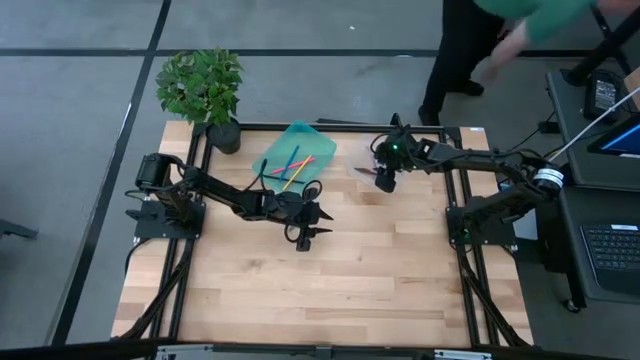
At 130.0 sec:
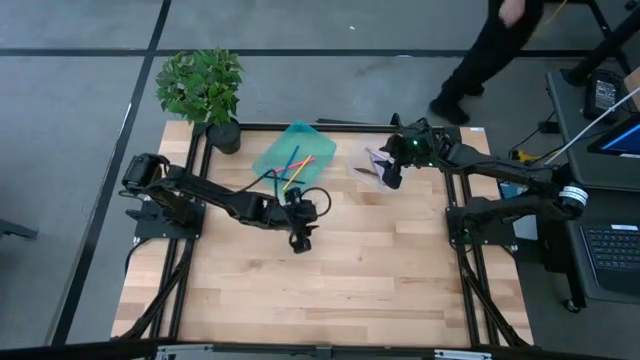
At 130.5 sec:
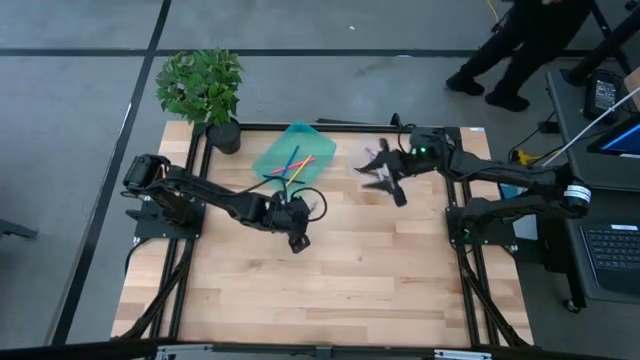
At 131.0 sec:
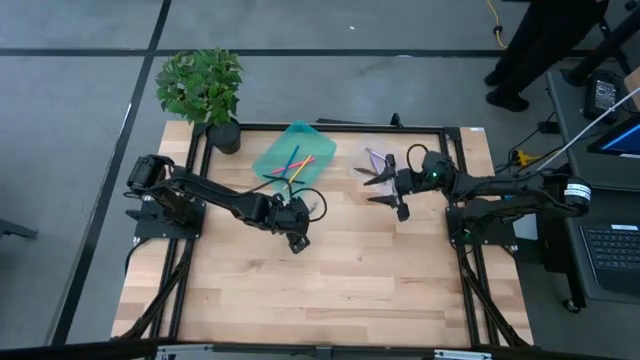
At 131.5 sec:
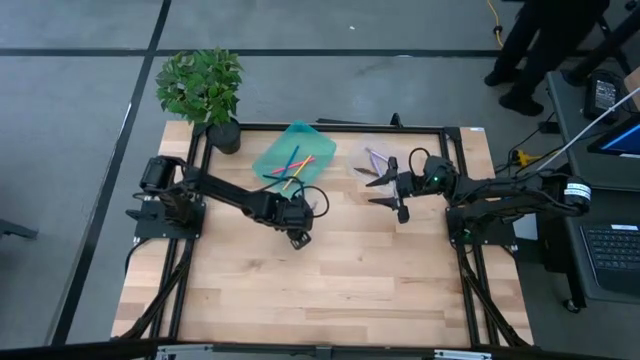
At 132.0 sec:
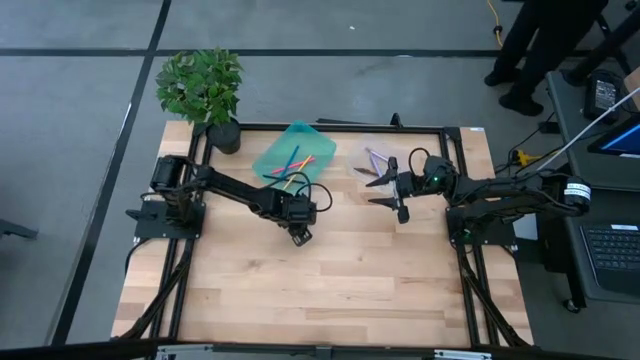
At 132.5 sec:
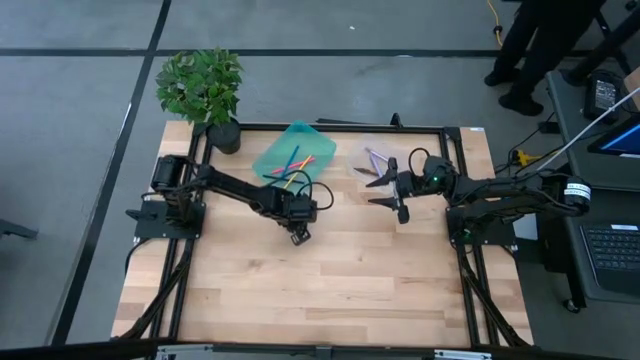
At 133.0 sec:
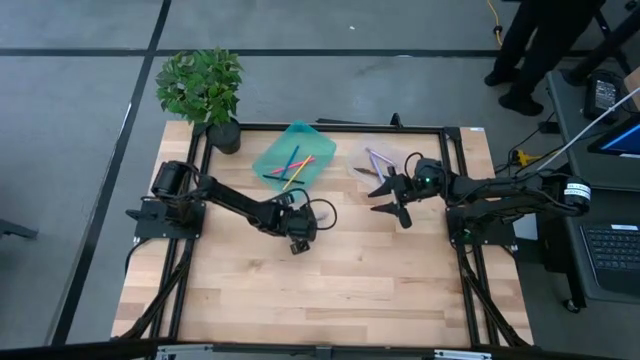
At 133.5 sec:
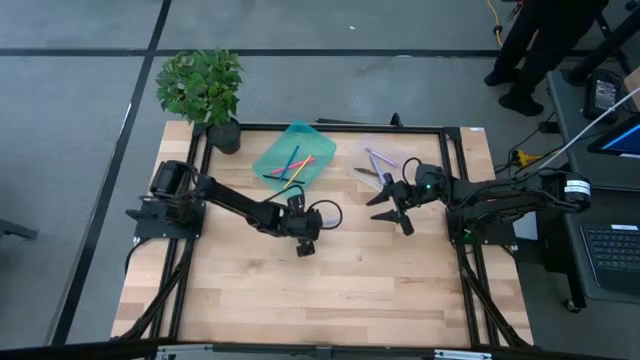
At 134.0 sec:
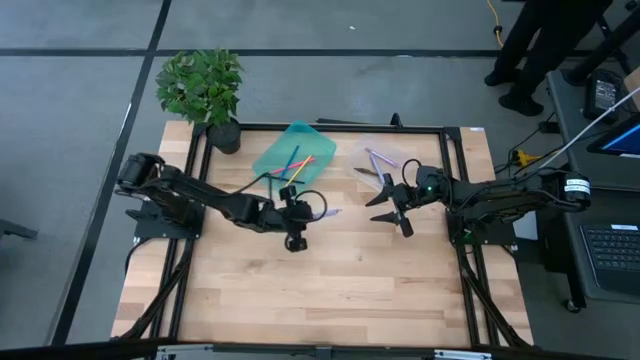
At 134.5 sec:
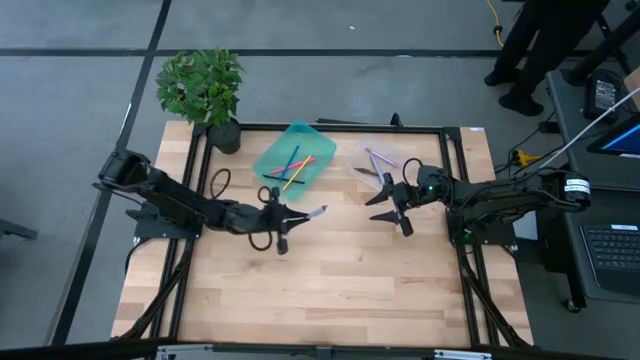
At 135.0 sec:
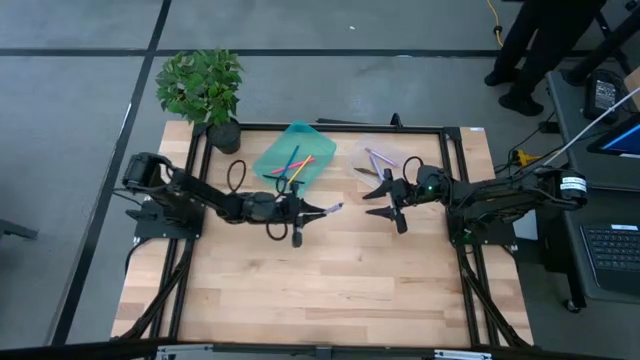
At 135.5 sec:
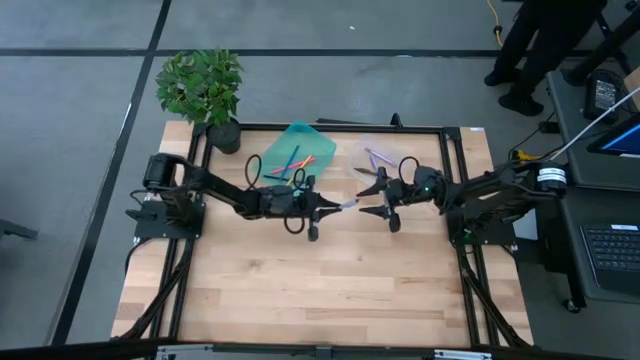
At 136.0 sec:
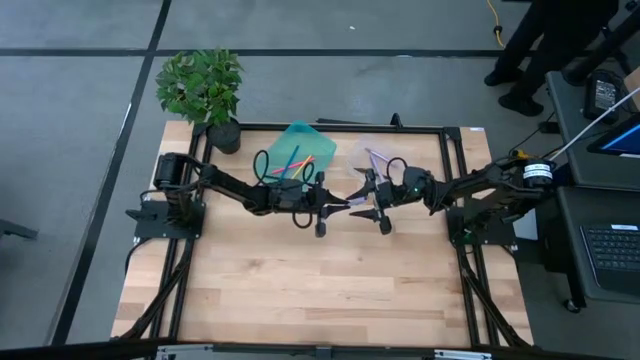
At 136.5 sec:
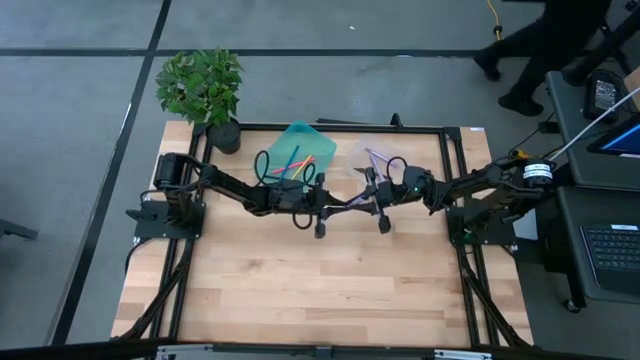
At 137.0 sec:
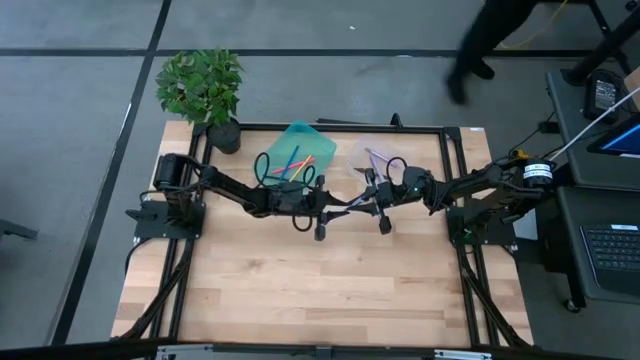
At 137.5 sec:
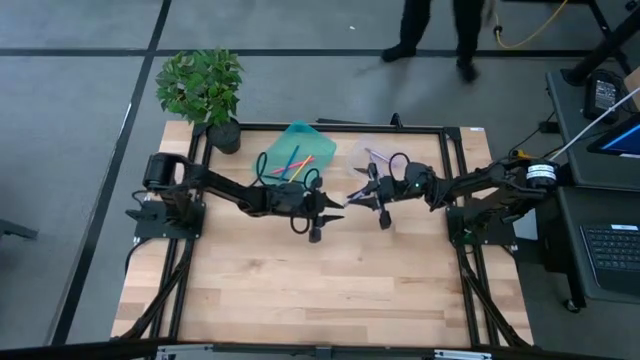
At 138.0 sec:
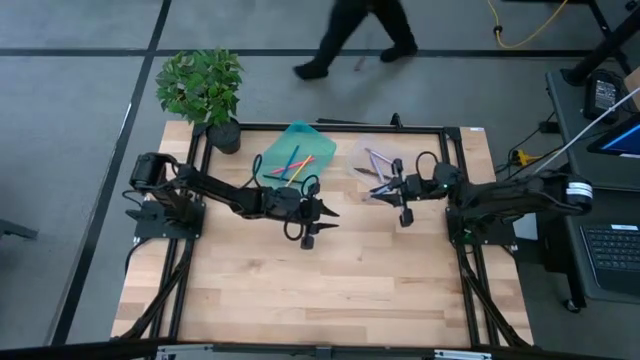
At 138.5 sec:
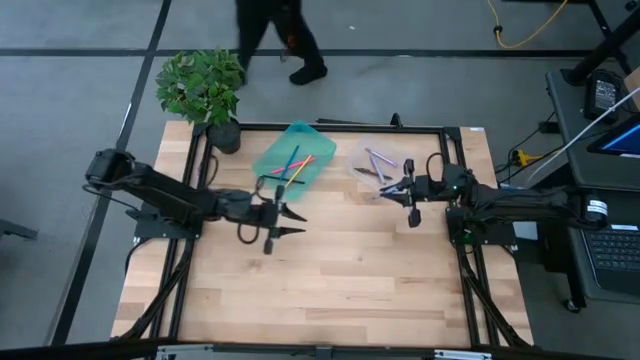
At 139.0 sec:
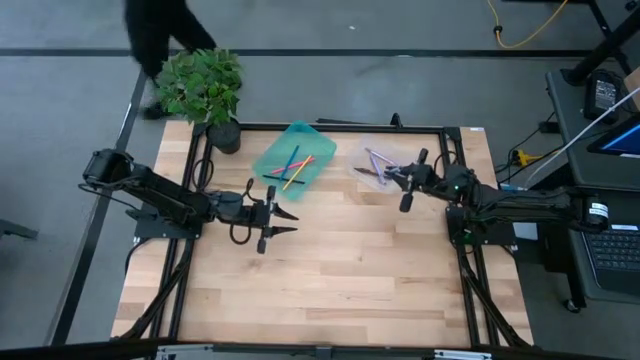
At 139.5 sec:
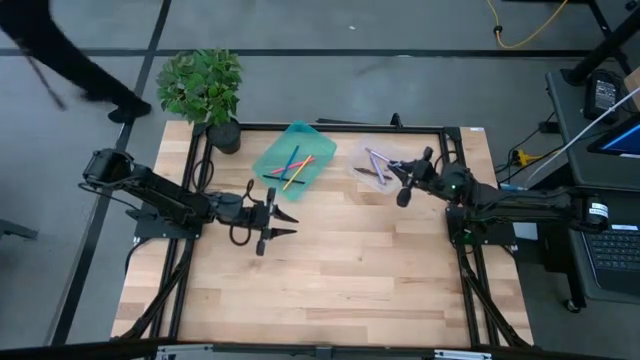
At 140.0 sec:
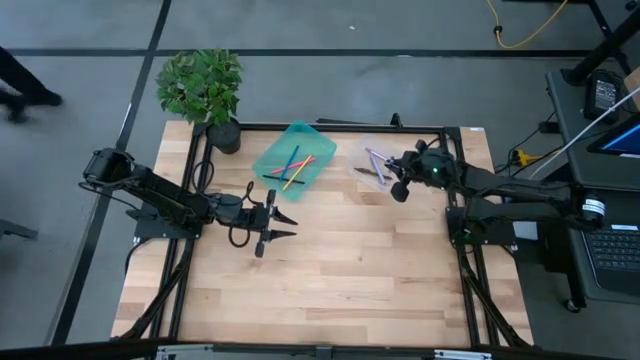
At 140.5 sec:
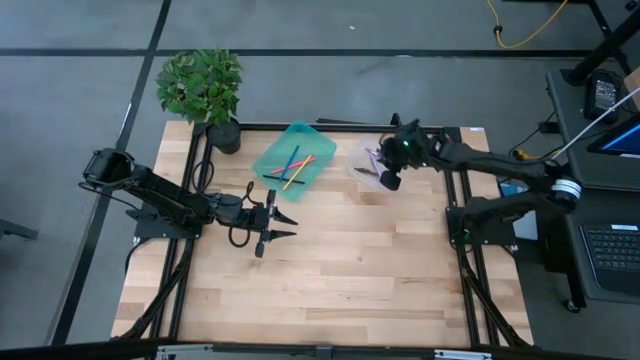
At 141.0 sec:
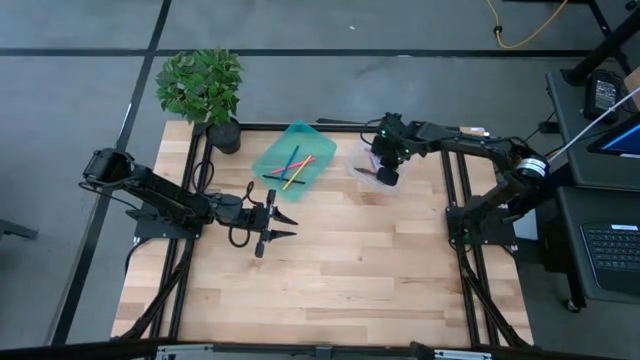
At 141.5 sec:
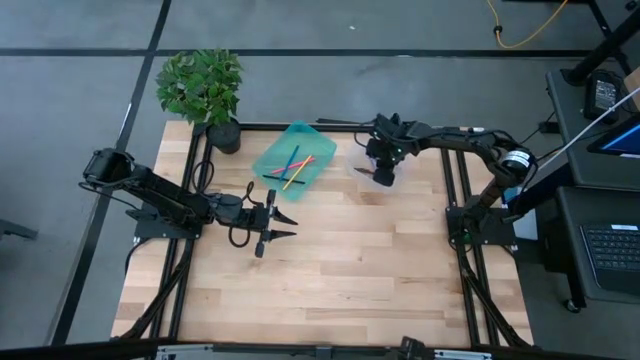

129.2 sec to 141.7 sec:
Task: Sort pens & pencils
Put the dark purple pen into the transparent bin

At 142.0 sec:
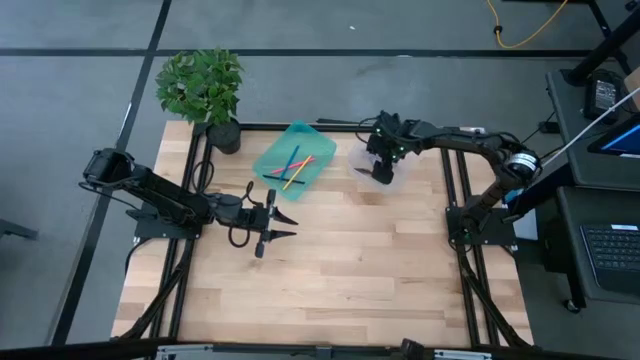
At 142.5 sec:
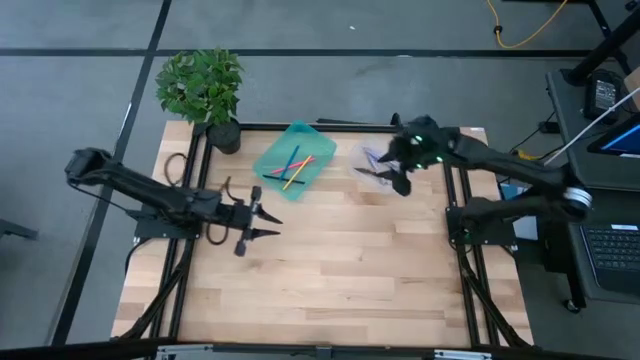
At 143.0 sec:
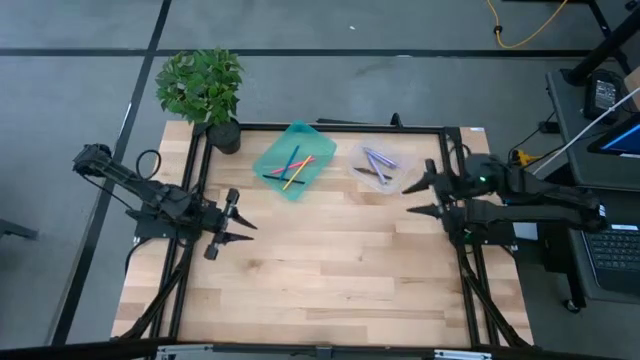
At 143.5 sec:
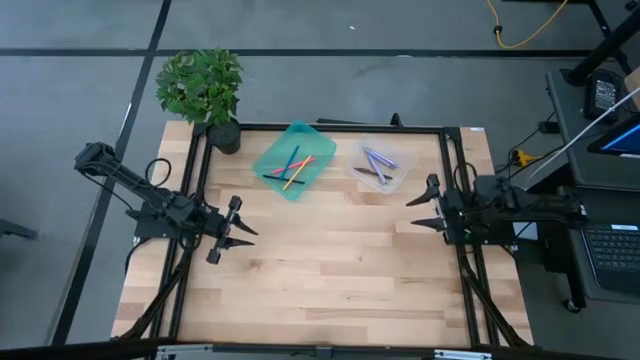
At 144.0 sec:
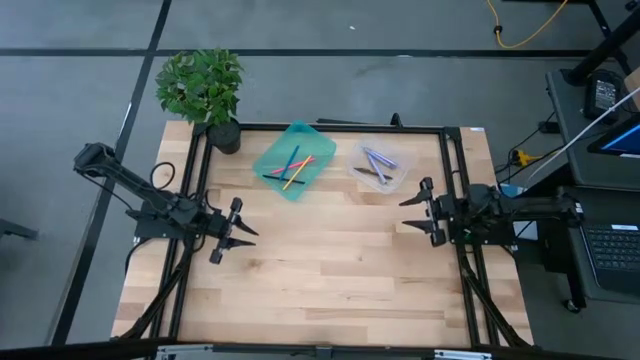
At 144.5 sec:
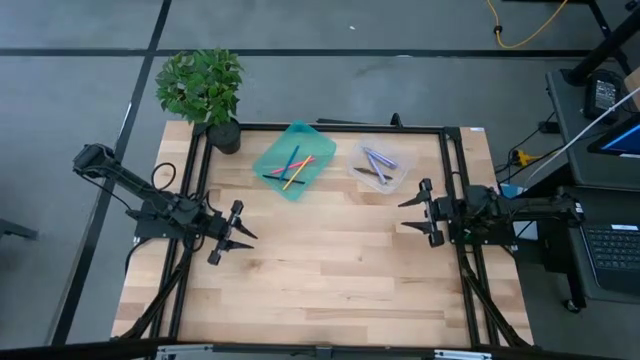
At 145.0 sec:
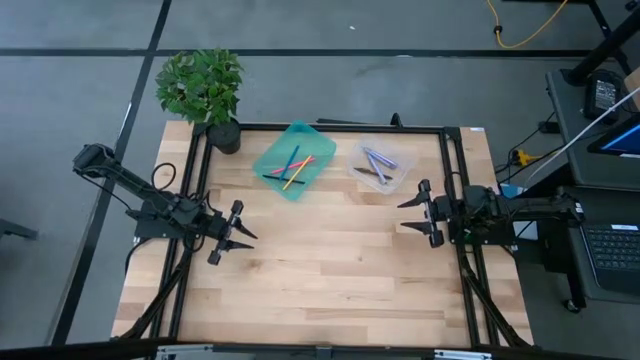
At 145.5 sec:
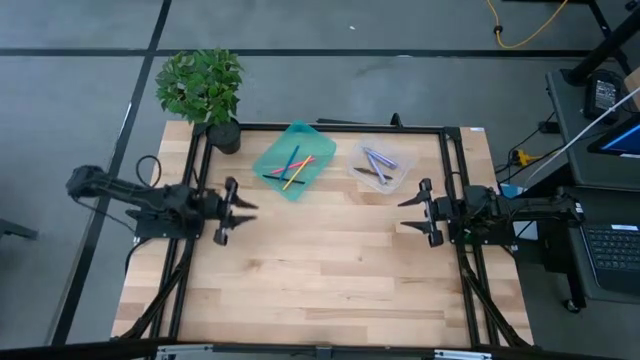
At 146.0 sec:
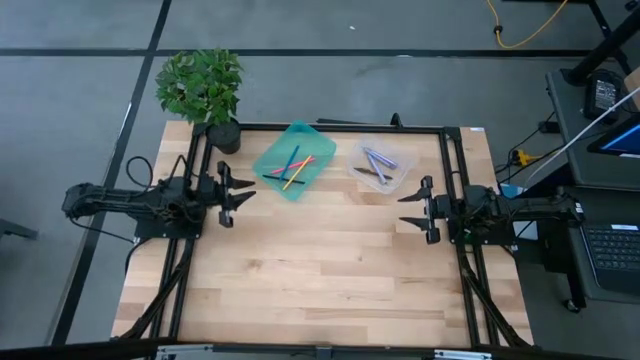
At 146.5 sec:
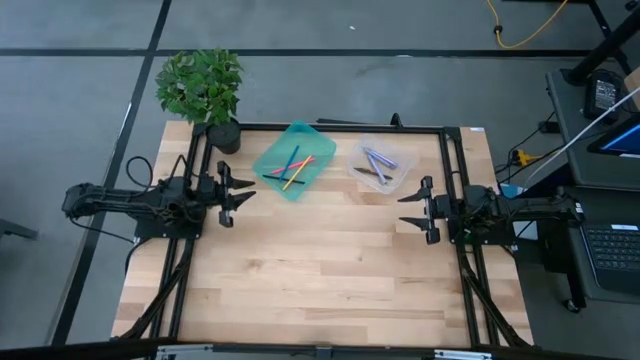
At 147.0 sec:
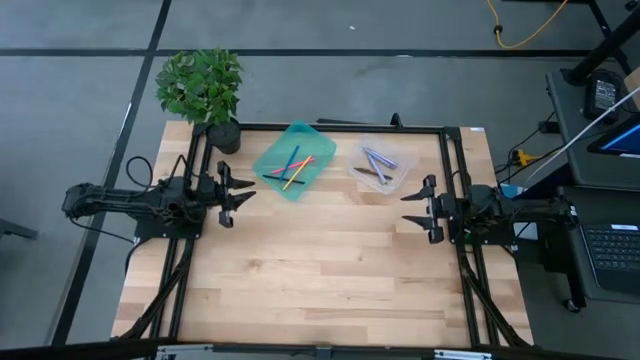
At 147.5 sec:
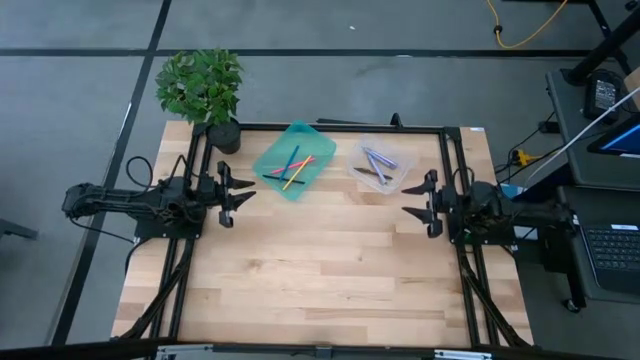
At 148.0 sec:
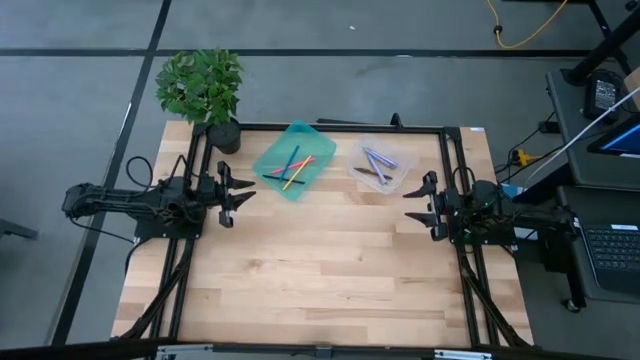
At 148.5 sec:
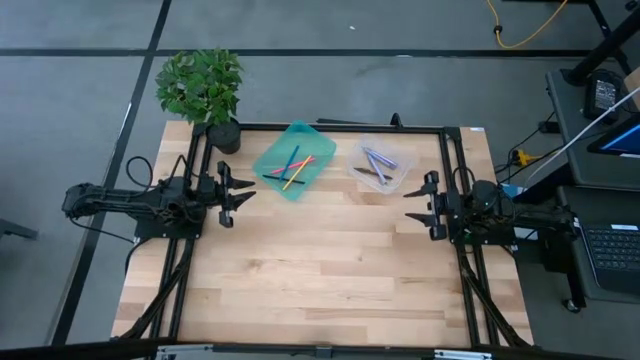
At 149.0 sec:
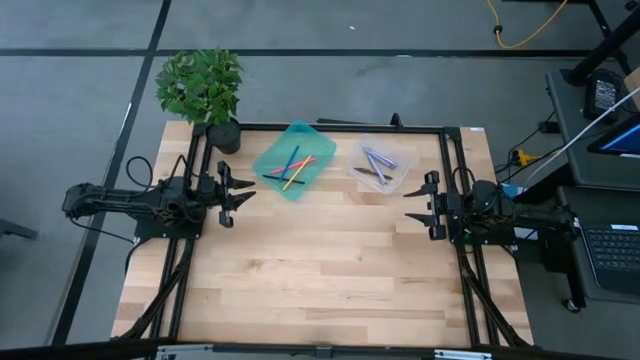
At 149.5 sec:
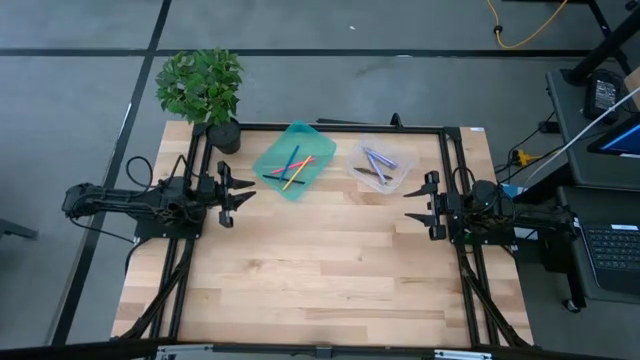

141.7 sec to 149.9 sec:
Return to Home Position

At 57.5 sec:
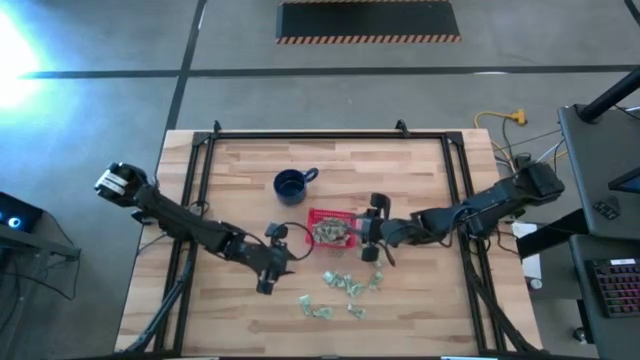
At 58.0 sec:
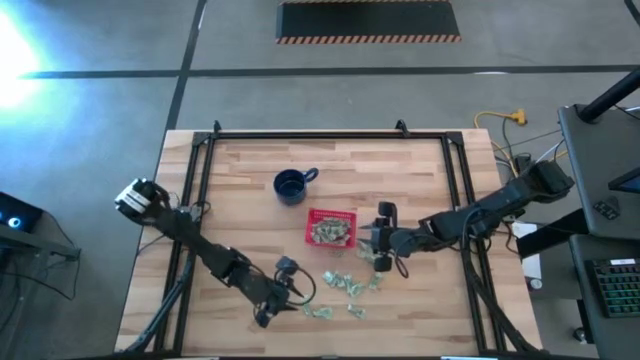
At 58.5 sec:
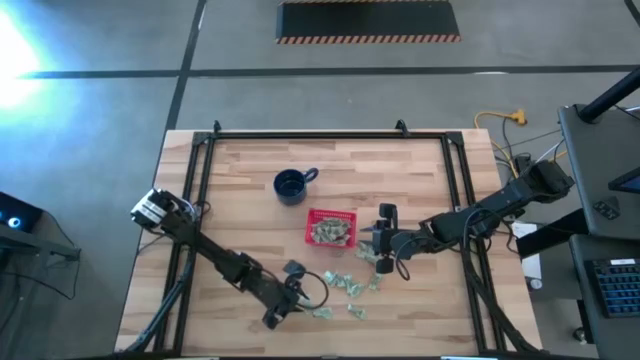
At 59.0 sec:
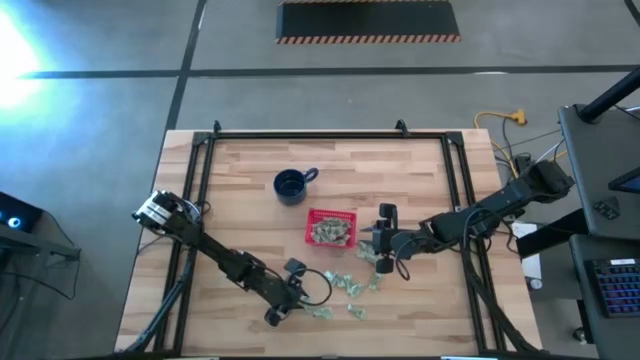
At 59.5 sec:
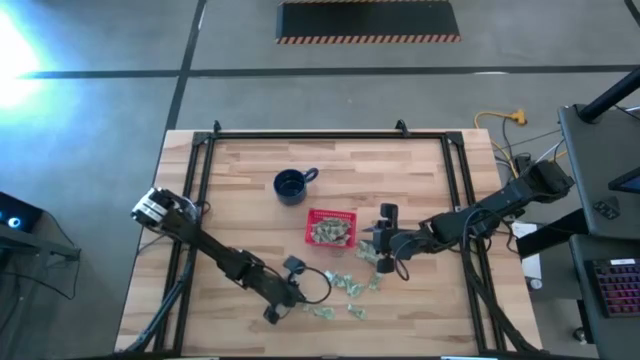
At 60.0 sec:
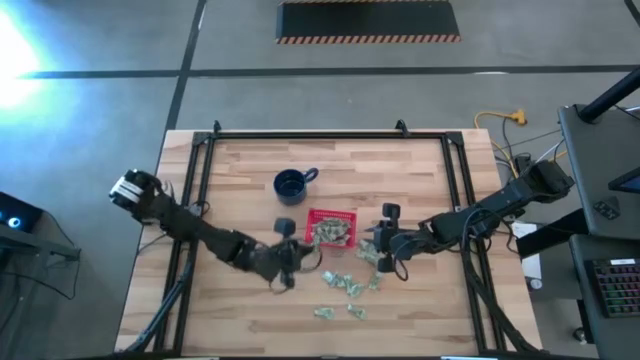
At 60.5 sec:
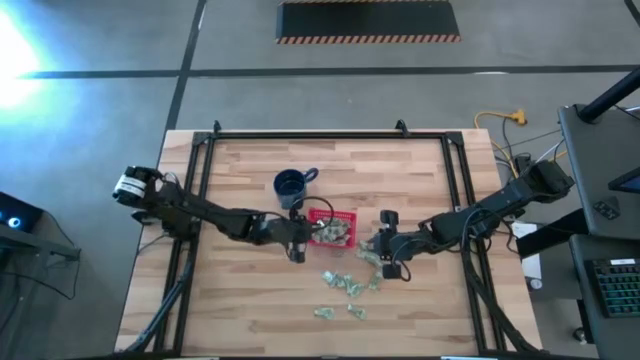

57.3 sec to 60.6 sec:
Task: Pick and place Stevia / Truvia into bins
Put the white stevia packet into the red basket
